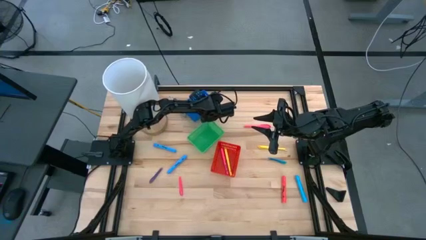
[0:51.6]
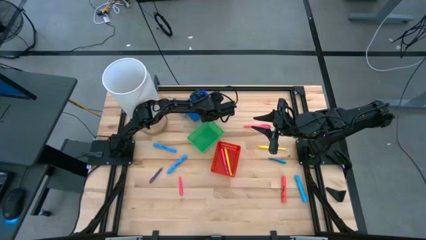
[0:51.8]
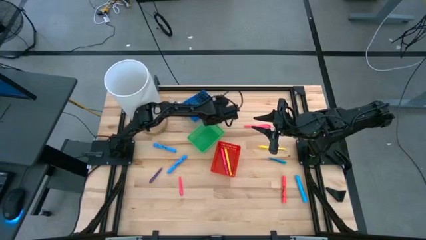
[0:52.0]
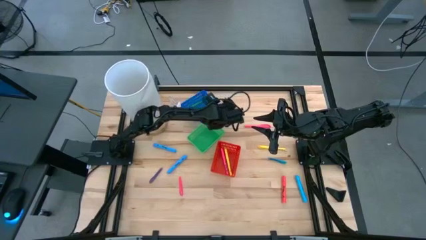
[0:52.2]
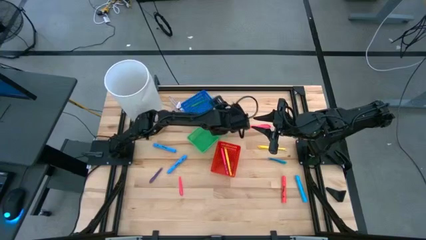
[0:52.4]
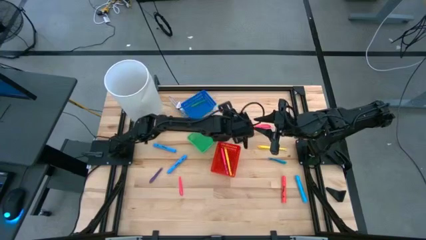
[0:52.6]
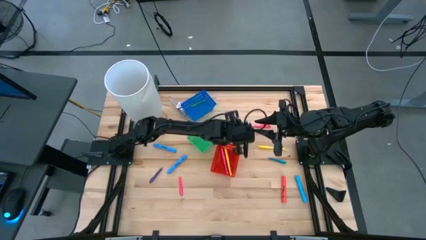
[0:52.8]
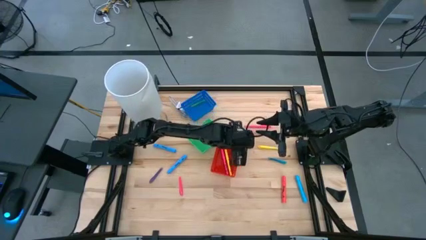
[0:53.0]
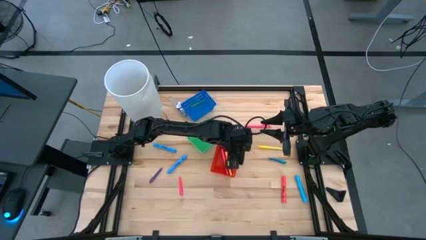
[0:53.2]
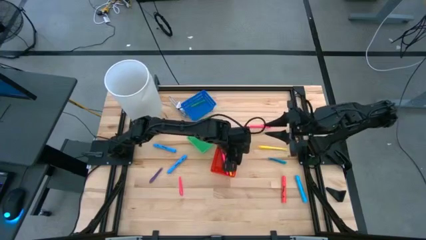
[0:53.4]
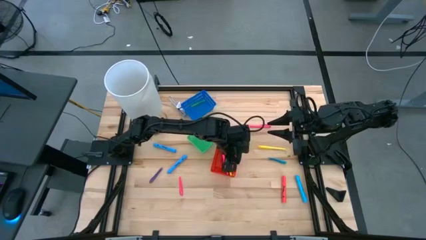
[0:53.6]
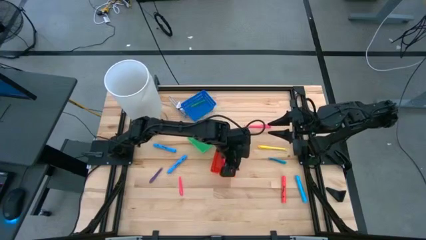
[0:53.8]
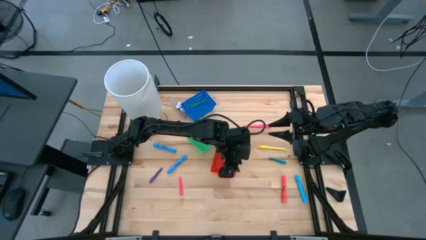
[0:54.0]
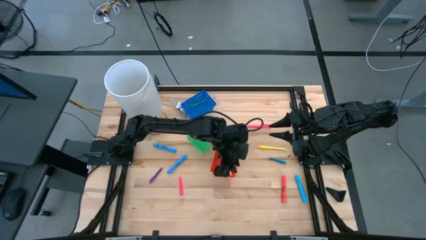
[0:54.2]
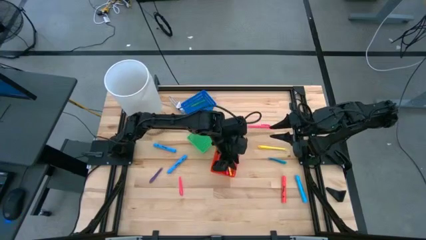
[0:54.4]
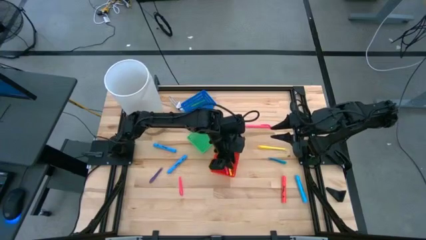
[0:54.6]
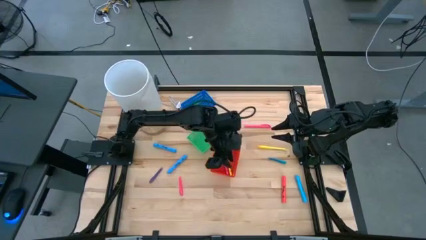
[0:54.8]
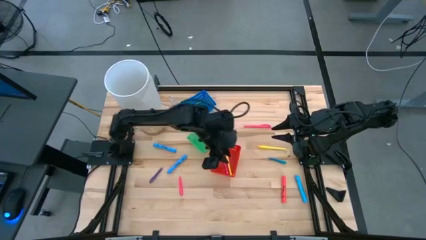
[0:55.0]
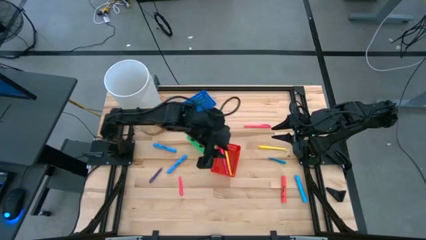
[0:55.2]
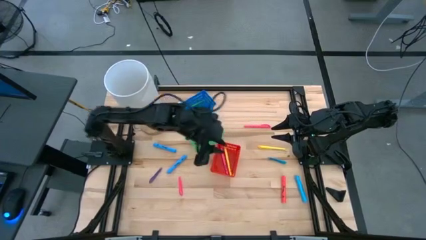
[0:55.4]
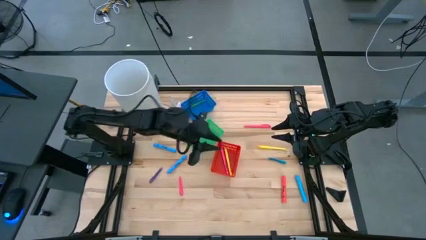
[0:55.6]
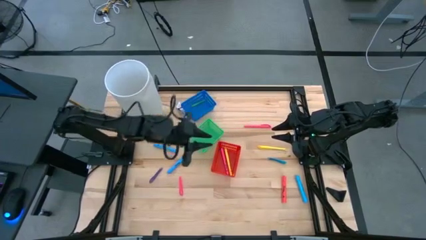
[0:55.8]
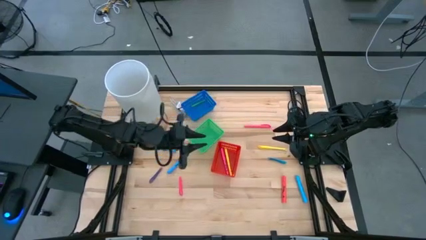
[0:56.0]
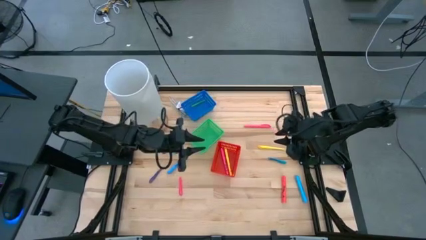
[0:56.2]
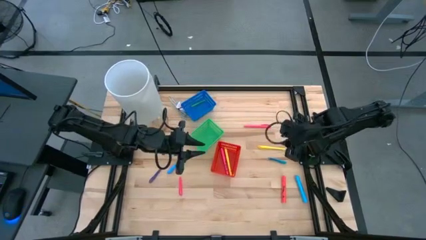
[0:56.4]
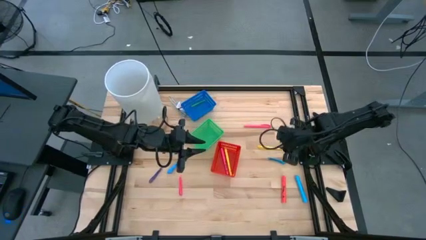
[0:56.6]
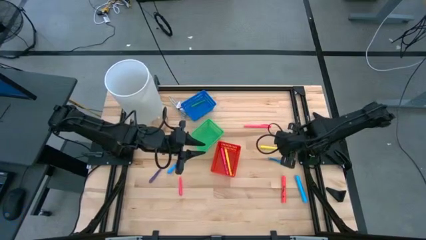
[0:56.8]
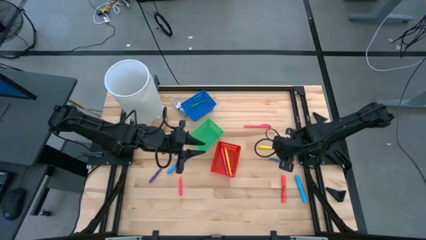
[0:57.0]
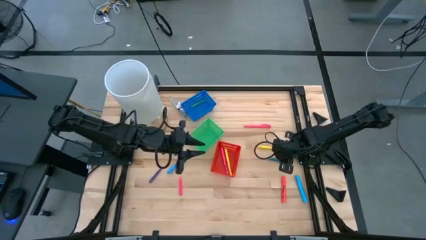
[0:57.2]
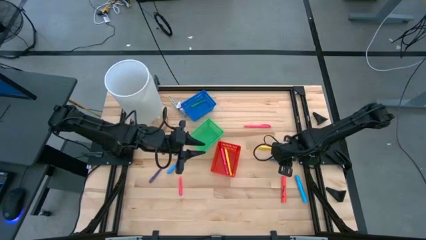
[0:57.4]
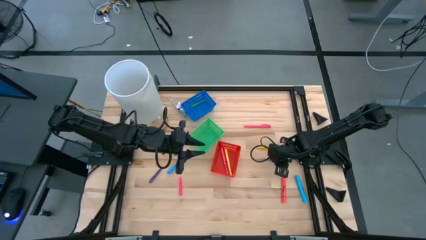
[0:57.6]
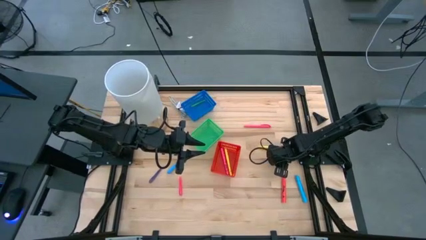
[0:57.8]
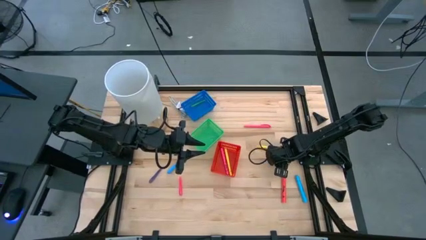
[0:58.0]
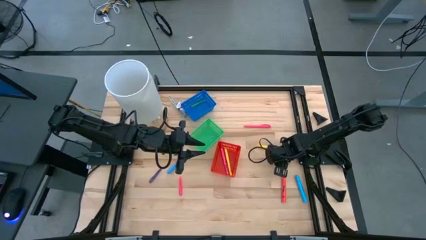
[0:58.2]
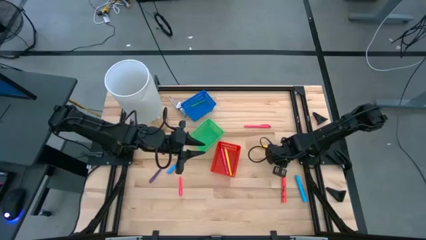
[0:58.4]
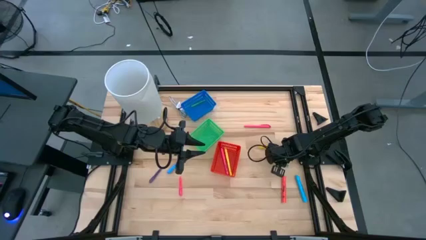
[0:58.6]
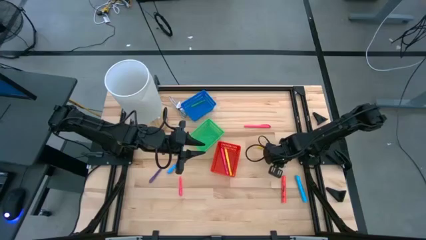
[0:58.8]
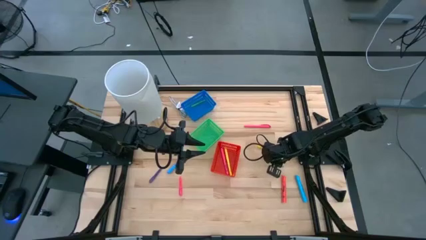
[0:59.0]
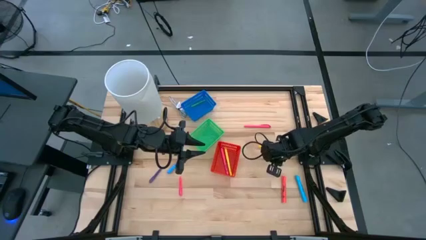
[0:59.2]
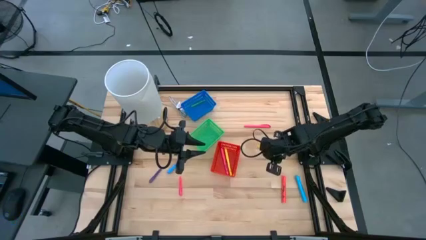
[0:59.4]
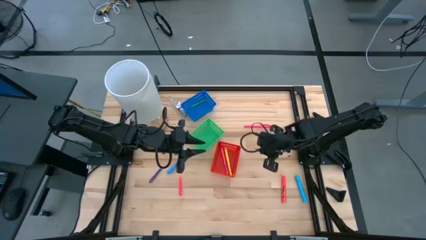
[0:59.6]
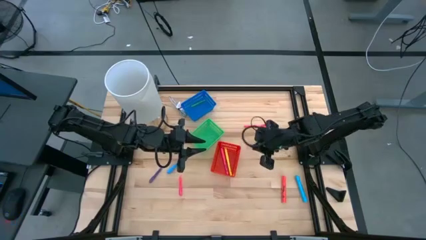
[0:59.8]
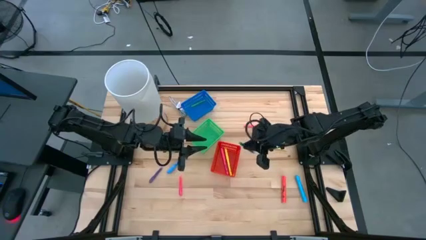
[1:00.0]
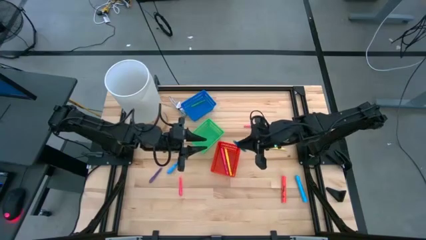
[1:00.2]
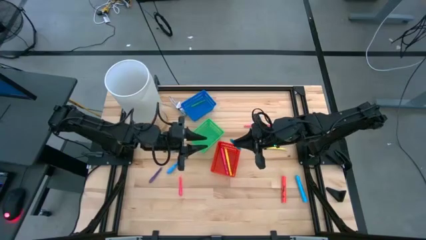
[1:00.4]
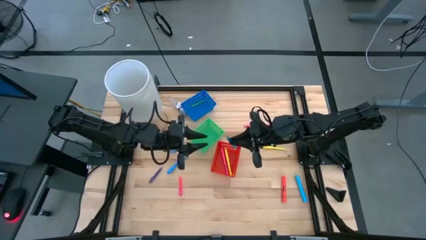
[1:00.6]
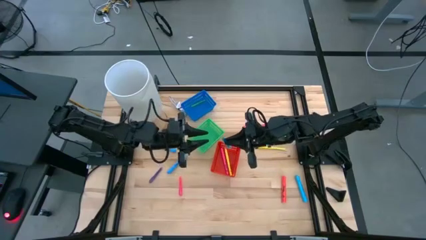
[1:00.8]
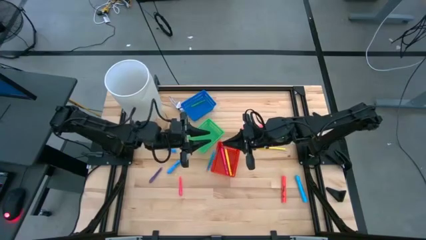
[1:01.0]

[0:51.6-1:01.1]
Task: Pick & Place Markers
Put the small blue pen into the blue bin
